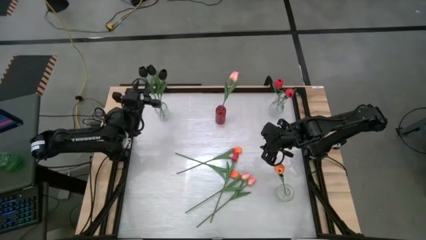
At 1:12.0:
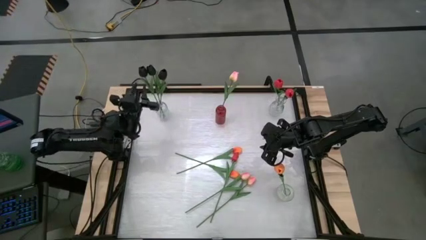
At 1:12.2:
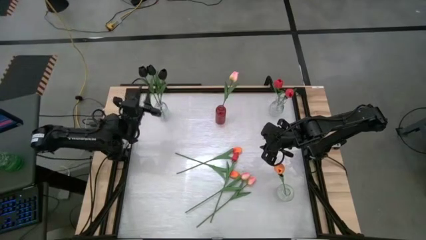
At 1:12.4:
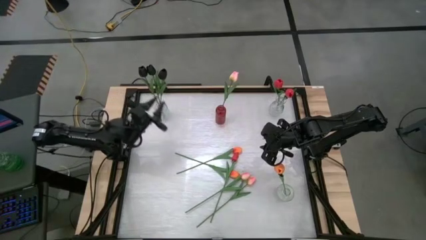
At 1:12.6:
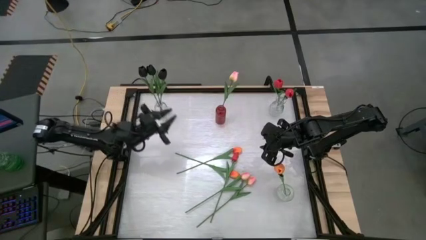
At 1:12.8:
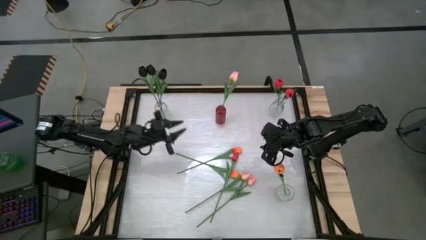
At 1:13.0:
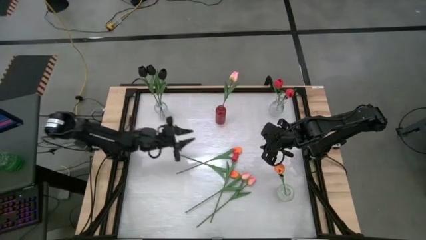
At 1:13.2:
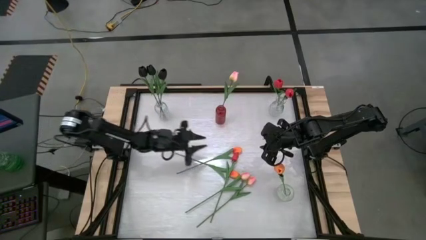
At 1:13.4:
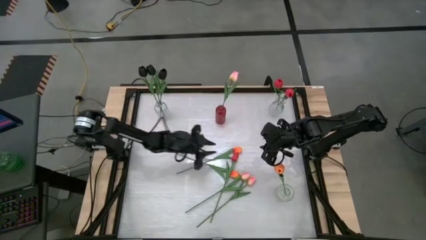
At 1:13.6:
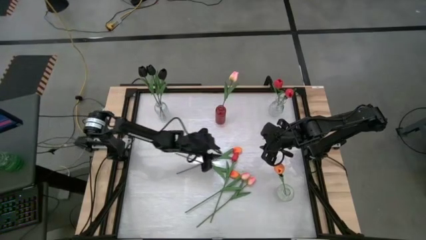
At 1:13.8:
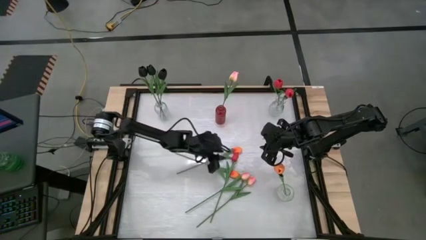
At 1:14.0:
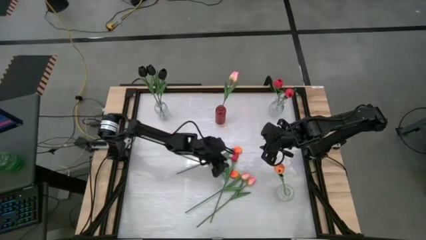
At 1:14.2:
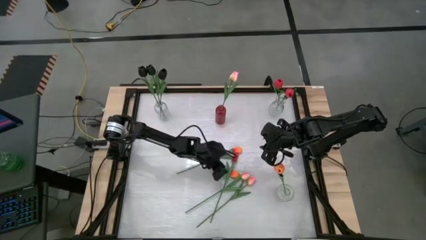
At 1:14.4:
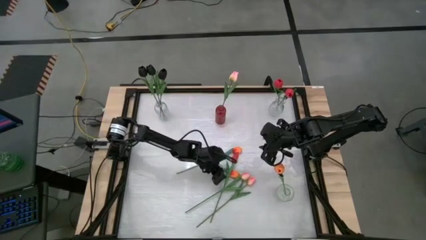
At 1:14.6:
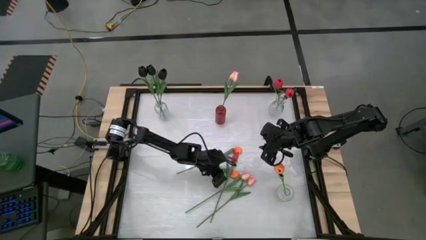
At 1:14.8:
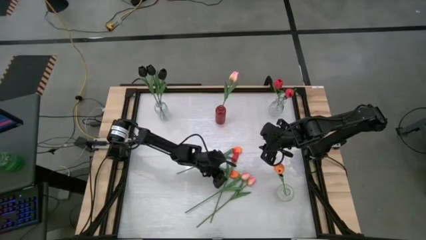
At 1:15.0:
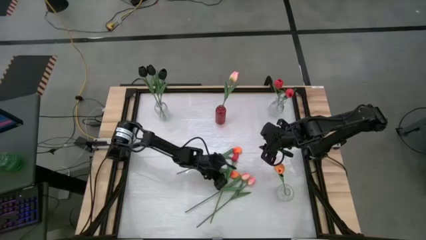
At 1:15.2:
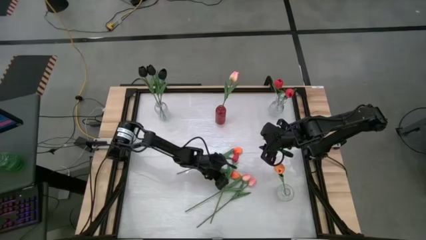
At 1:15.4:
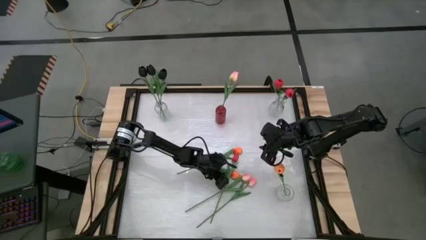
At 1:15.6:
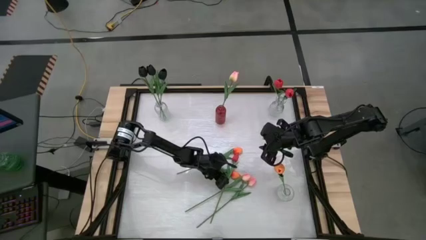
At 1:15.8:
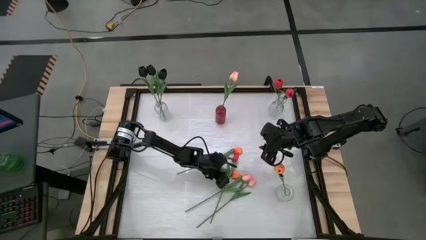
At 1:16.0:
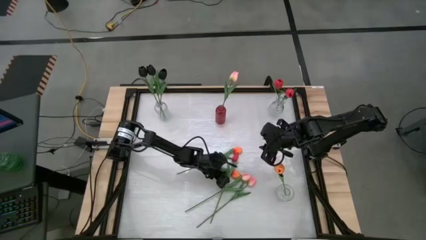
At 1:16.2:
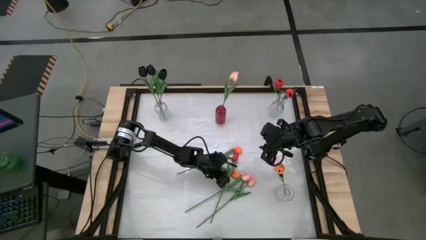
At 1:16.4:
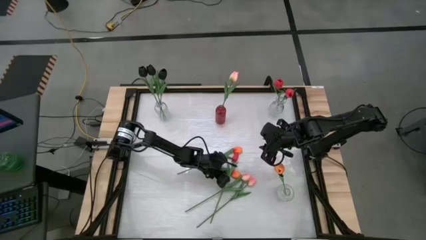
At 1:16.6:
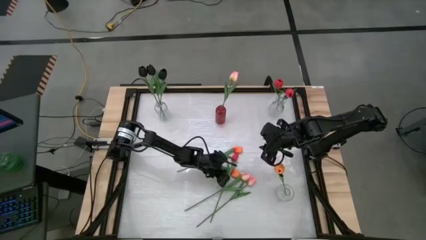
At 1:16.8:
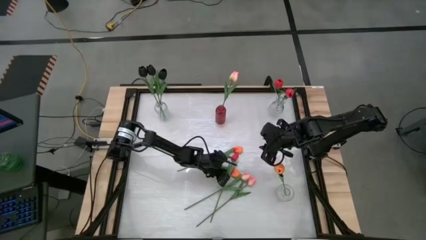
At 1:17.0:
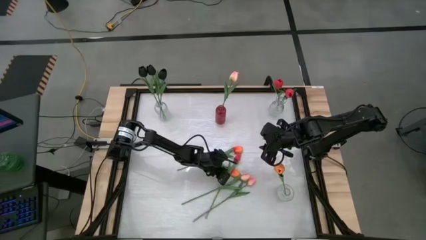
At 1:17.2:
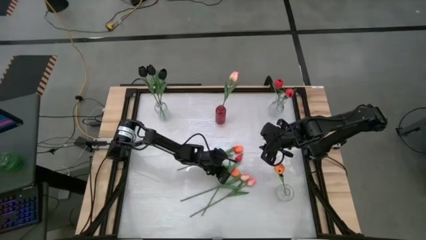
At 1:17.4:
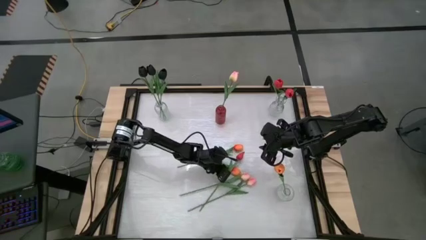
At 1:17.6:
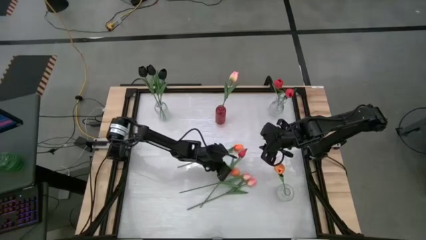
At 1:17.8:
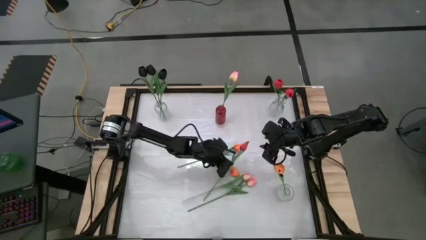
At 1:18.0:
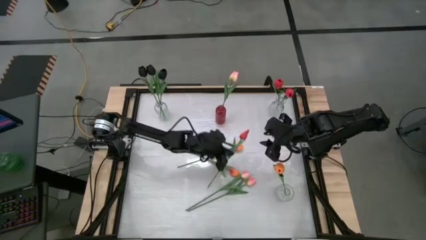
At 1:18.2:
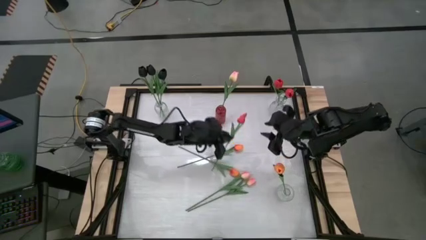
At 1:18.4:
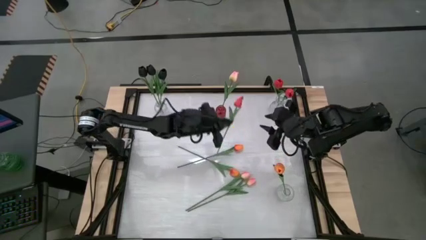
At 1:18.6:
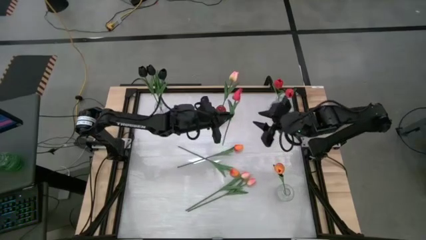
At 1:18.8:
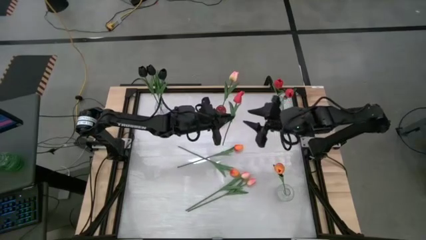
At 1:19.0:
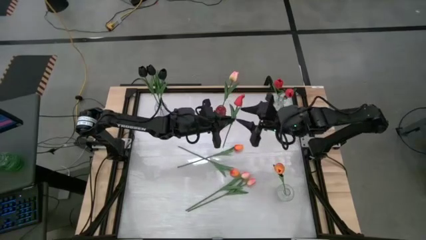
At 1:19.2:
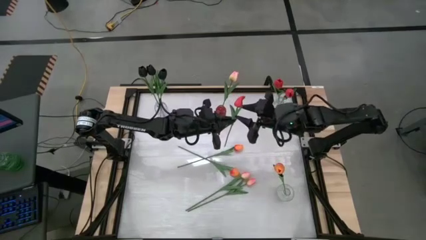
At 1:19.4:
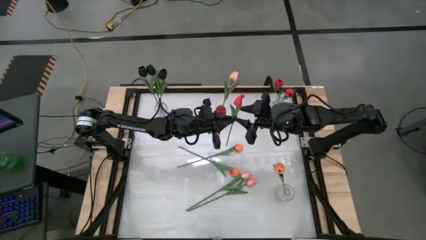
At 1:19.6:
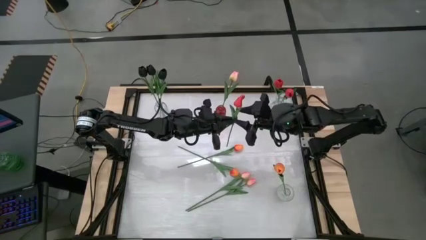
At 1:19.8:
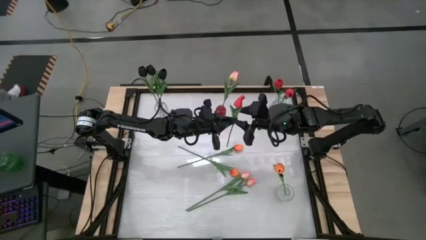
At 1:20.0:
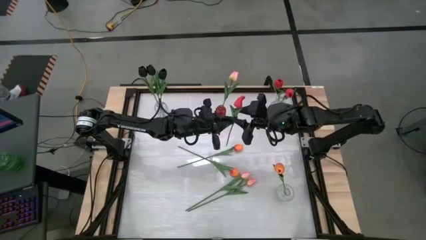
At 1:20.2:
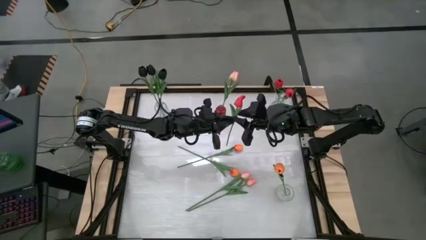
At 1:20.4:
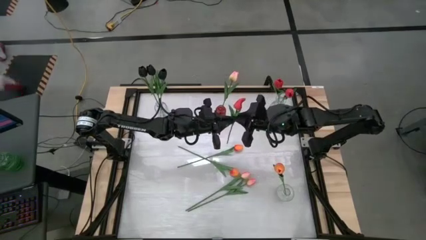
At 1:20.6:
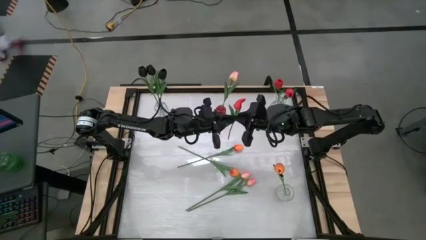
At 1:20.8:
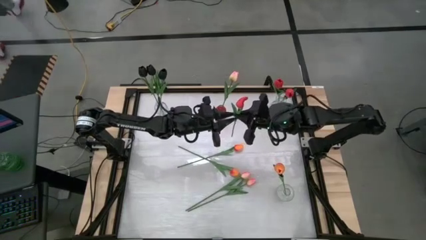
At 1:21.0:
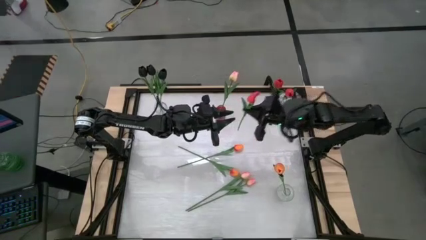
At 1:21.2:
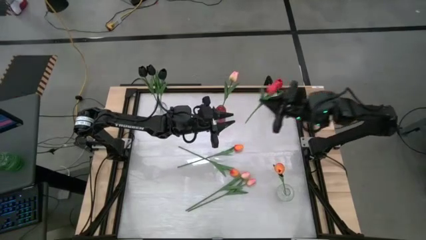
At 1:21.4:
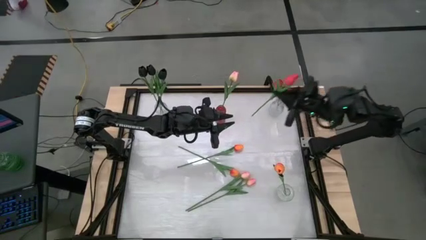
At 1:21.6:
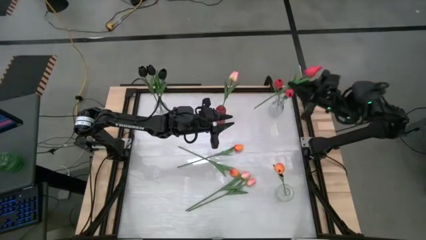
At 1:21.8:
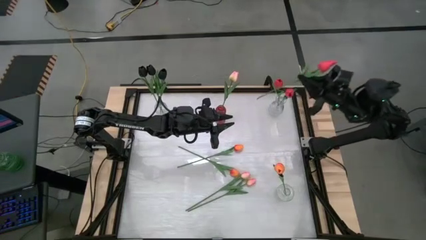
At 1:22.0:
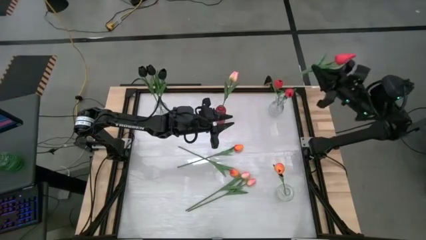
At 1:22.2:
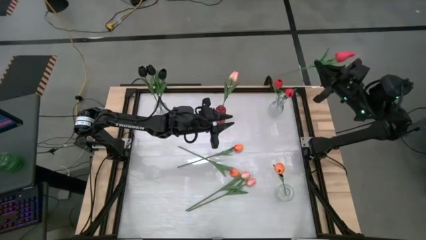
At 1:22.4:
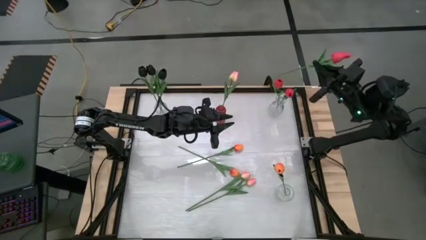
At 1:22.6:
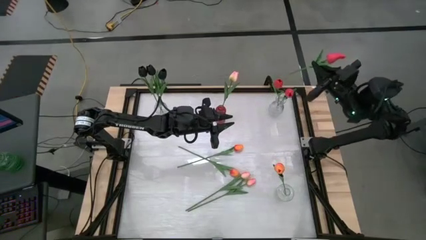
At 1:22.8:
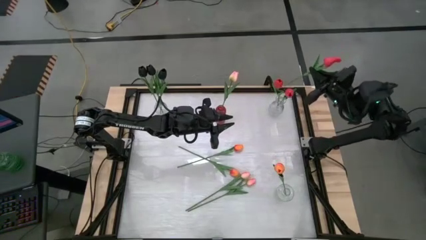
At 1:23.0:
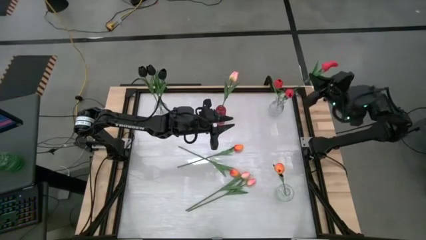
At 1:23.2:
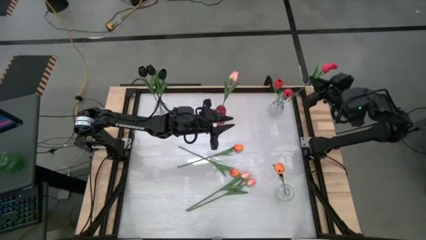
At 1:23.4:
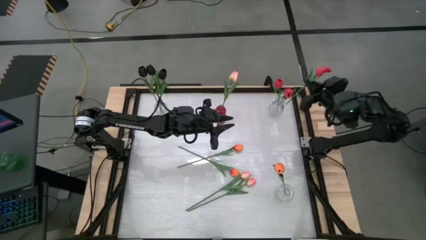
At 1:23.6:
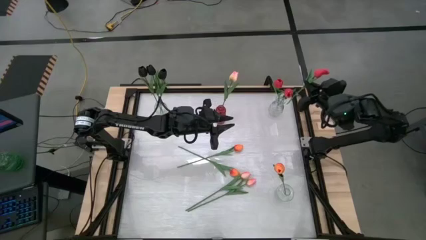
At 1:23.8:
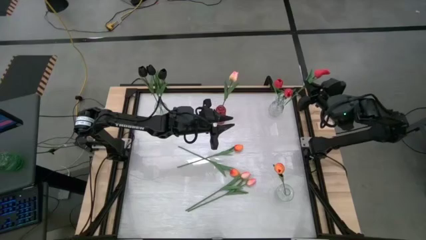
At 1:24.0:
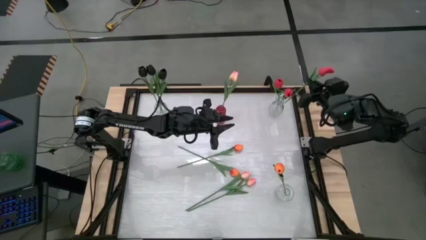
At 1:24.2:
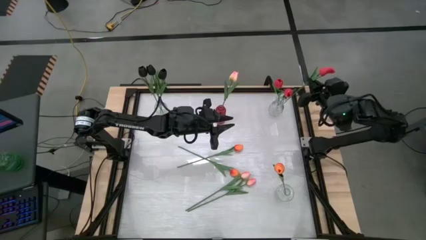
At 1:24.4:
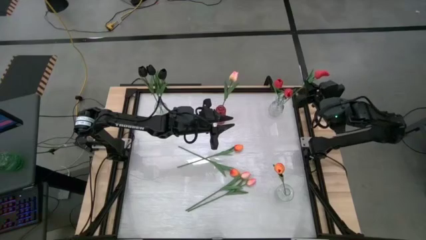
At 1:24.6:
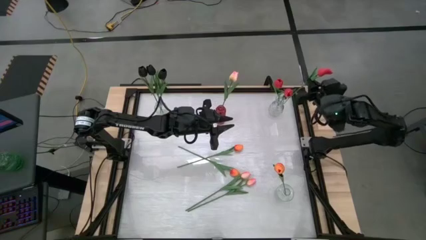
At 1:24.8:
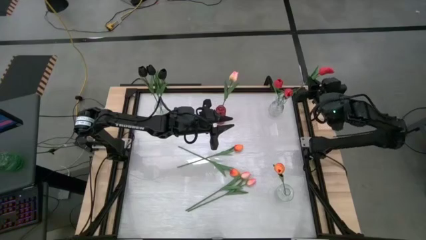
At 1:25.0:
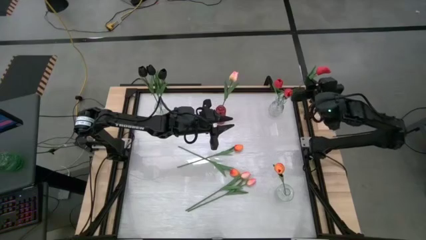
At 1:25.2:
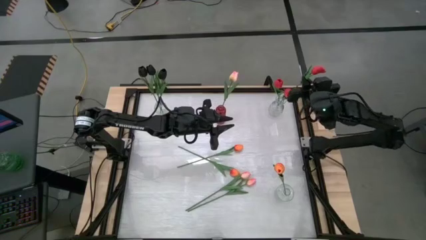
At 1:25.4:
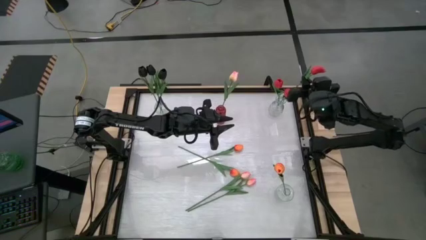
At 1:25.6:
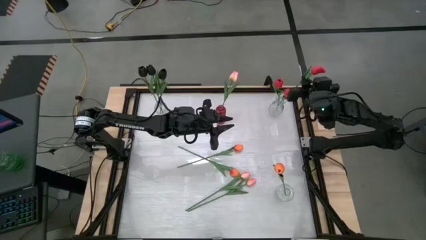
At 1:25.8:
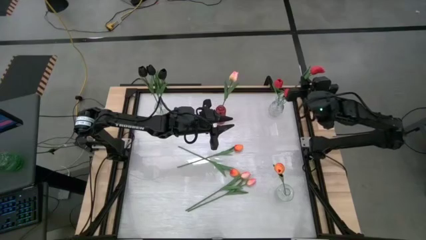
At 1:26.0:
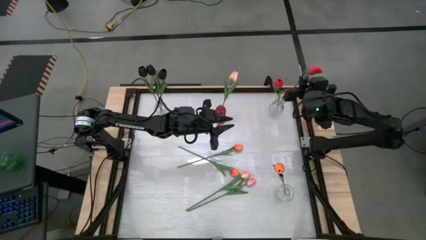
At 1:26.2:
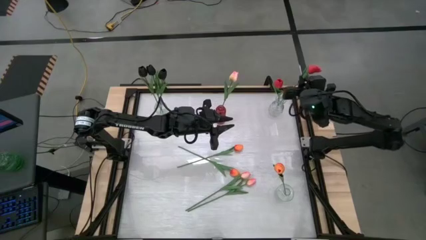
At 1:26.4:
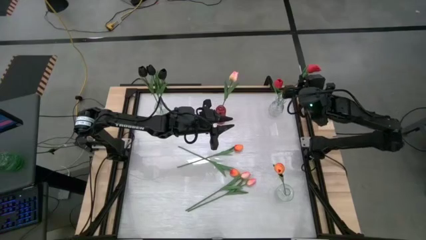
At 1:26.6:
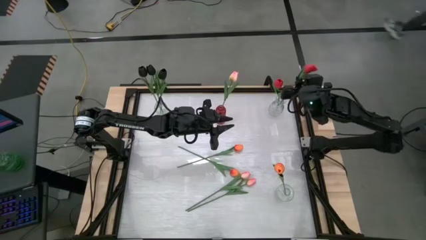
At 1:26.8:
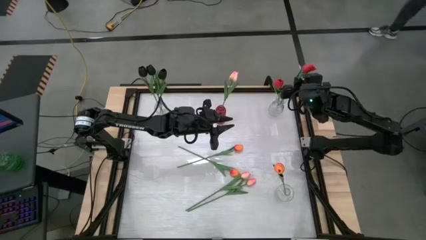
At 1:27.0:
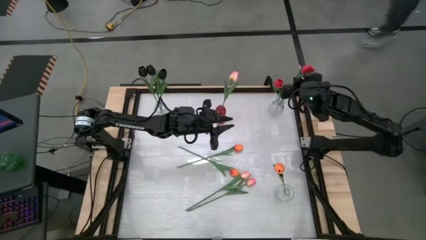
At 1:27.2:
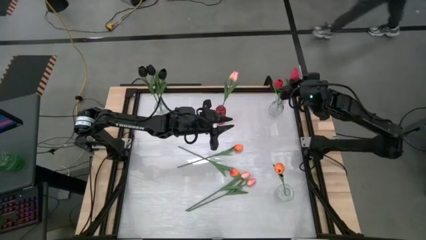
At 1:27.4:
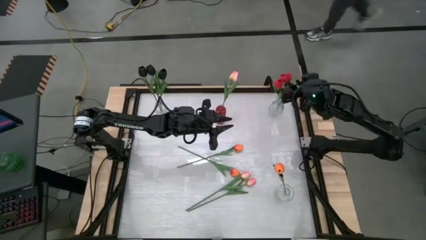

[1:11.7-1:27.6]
Task: Sort flowers into vase by color
Put the red flower into the top right transparent vase
